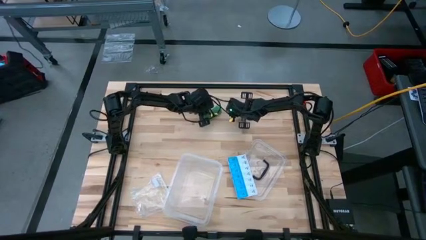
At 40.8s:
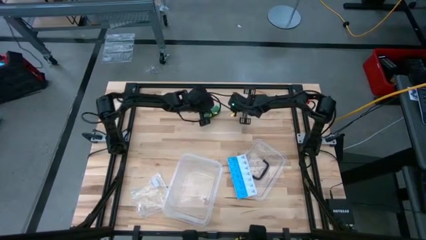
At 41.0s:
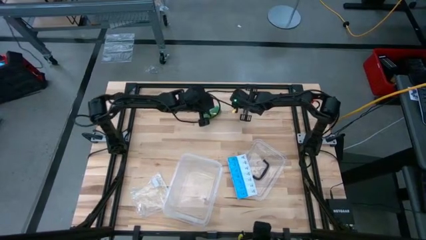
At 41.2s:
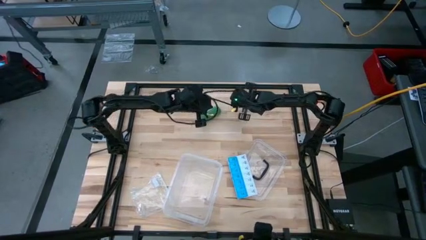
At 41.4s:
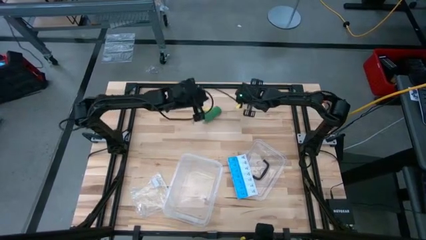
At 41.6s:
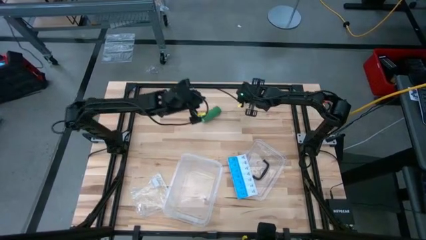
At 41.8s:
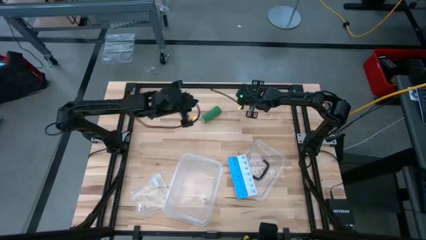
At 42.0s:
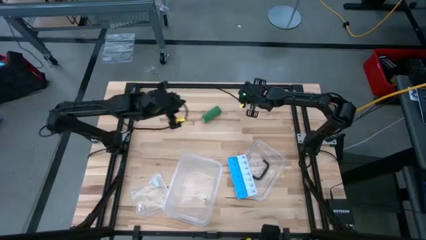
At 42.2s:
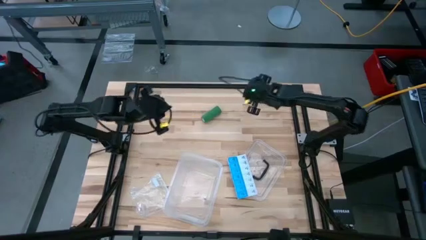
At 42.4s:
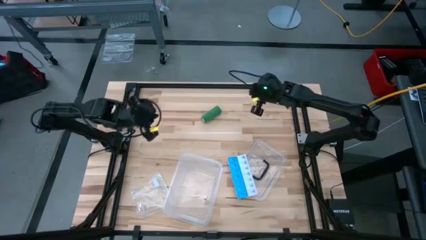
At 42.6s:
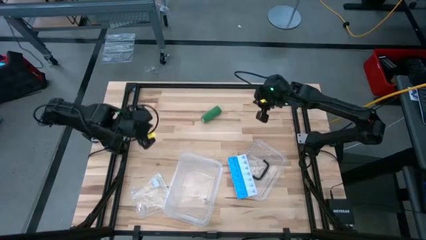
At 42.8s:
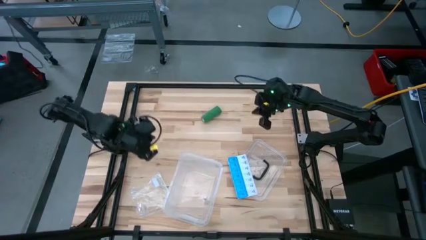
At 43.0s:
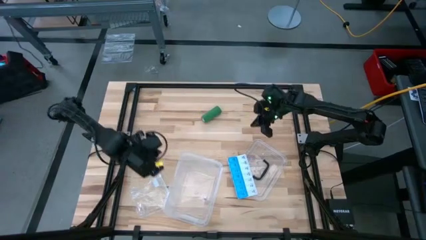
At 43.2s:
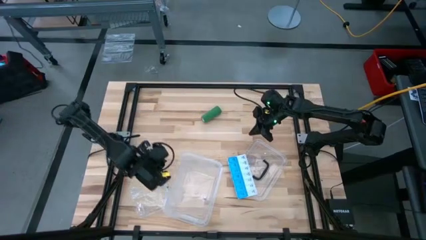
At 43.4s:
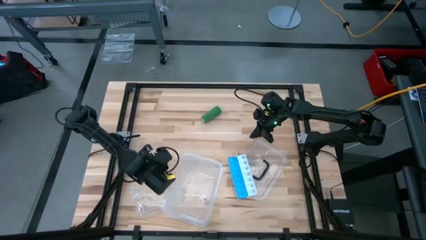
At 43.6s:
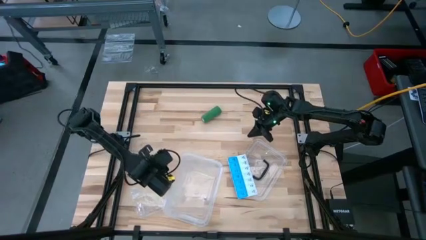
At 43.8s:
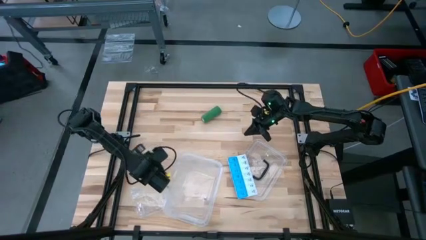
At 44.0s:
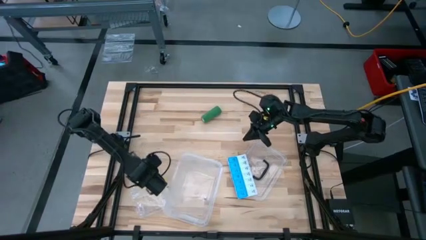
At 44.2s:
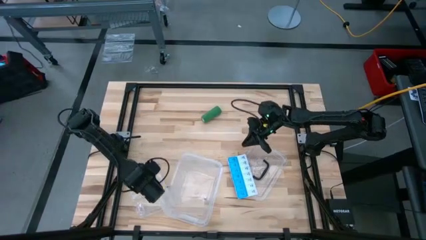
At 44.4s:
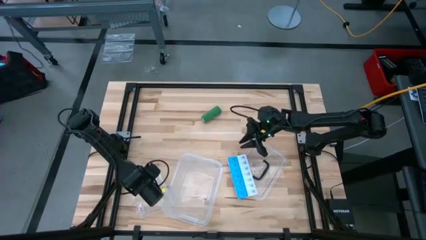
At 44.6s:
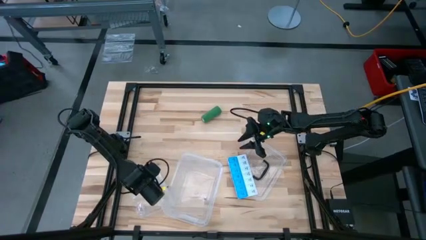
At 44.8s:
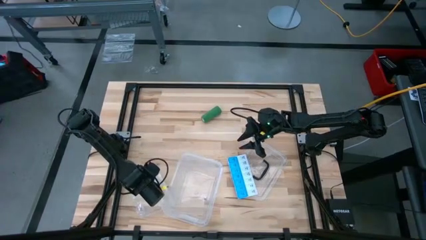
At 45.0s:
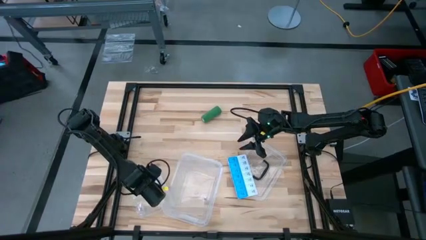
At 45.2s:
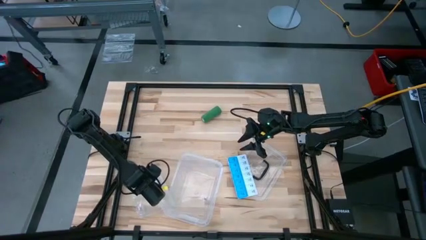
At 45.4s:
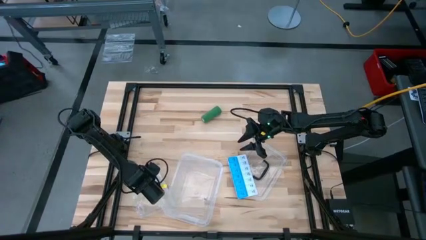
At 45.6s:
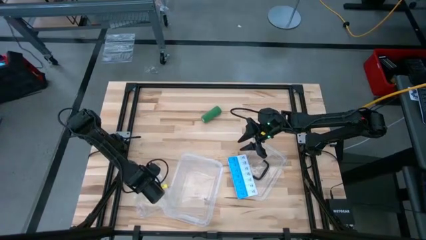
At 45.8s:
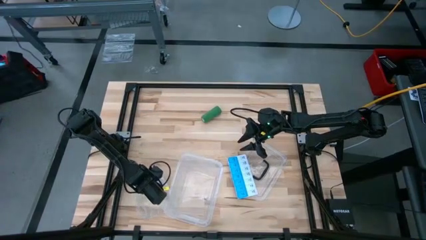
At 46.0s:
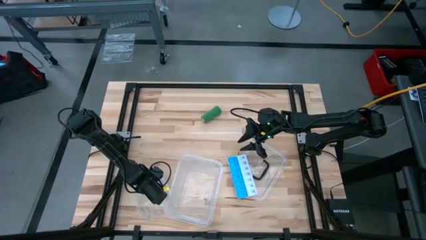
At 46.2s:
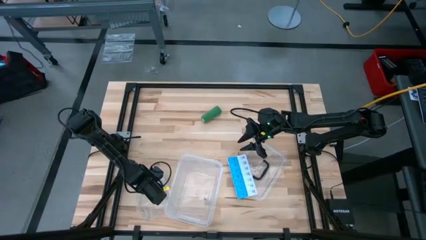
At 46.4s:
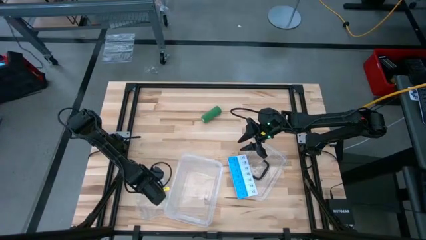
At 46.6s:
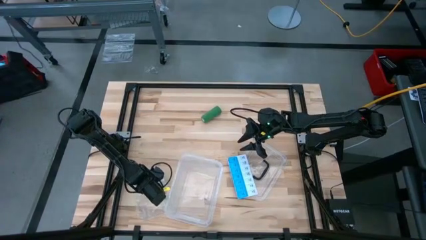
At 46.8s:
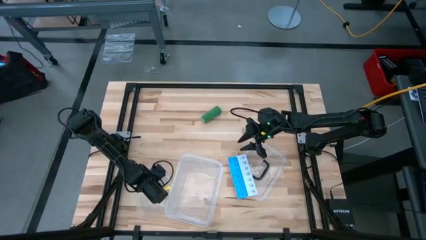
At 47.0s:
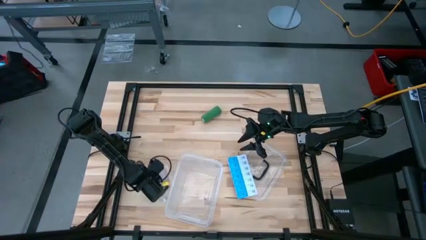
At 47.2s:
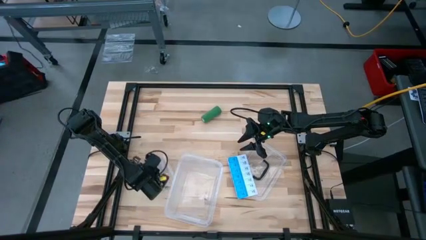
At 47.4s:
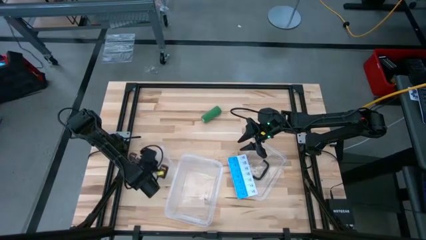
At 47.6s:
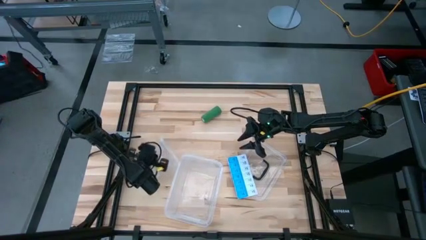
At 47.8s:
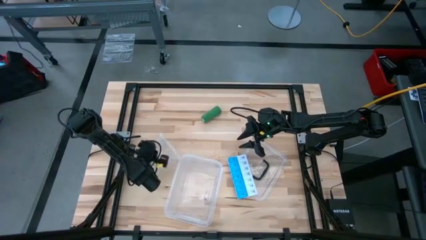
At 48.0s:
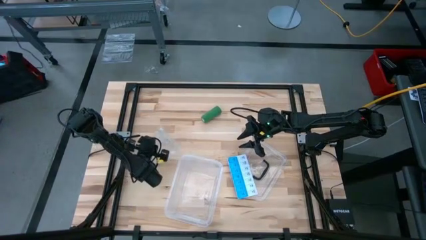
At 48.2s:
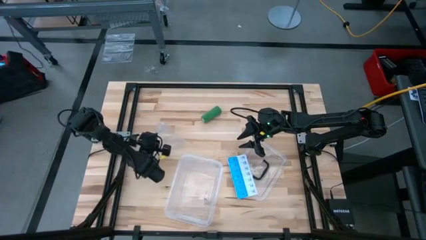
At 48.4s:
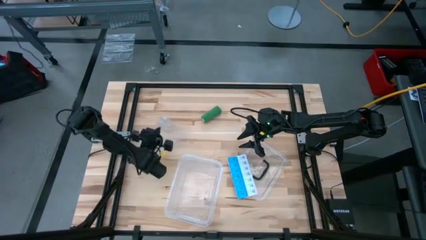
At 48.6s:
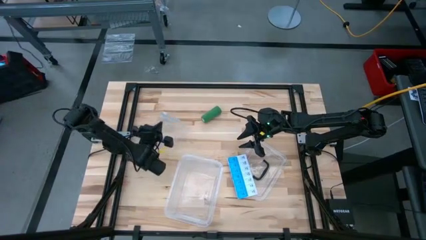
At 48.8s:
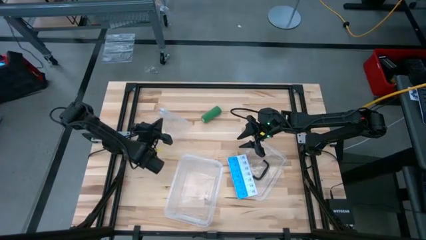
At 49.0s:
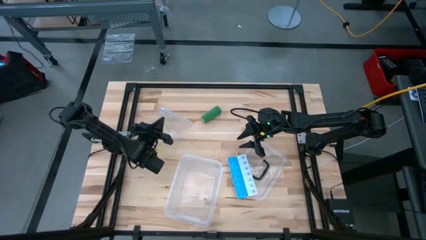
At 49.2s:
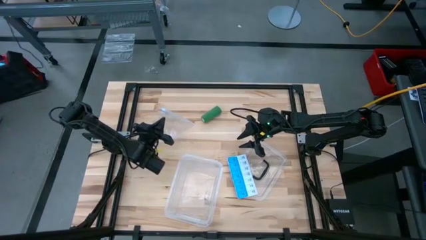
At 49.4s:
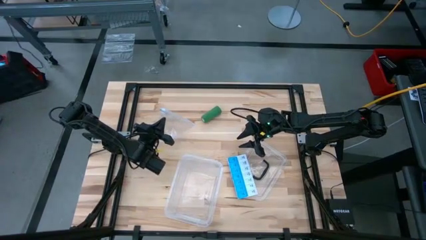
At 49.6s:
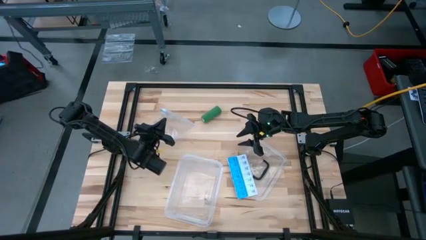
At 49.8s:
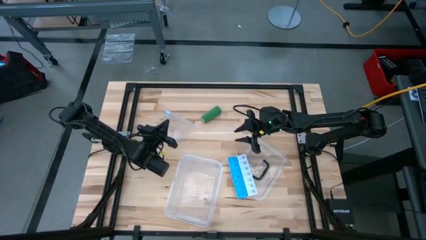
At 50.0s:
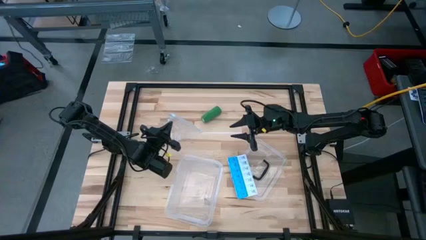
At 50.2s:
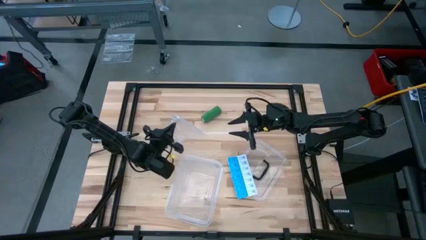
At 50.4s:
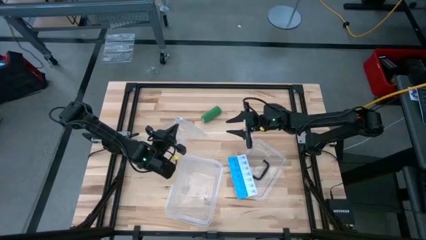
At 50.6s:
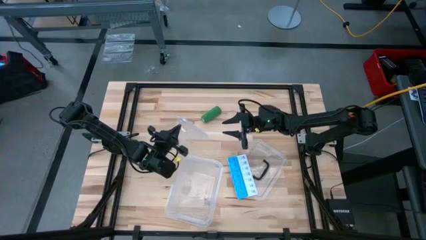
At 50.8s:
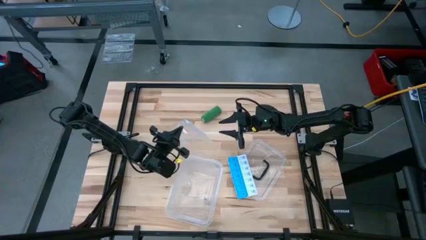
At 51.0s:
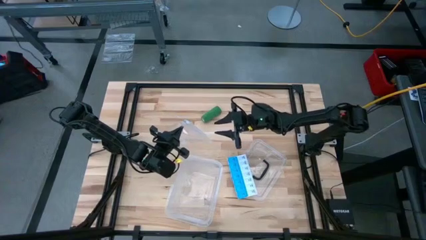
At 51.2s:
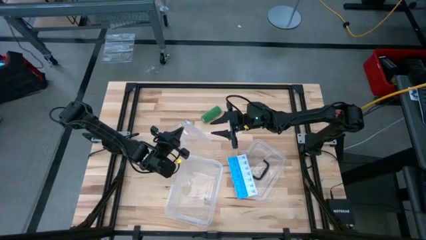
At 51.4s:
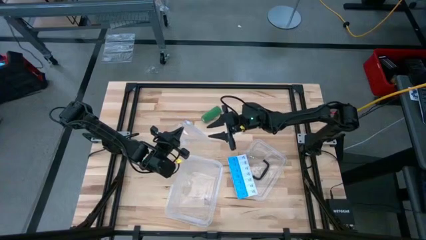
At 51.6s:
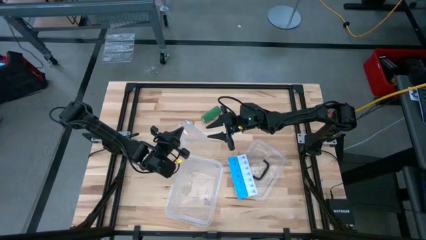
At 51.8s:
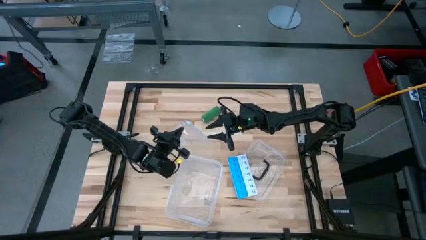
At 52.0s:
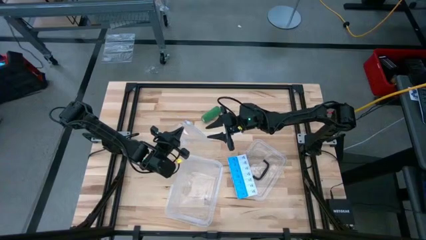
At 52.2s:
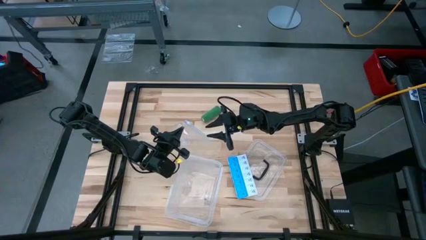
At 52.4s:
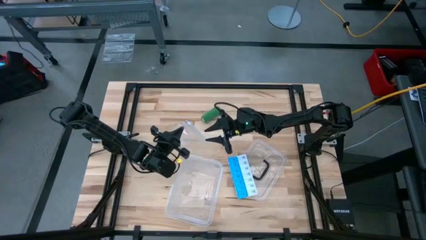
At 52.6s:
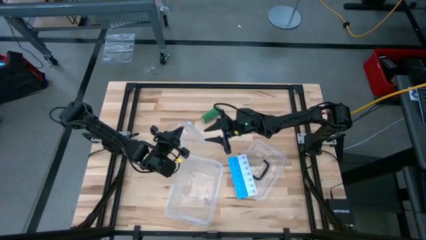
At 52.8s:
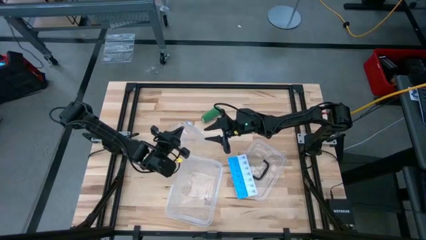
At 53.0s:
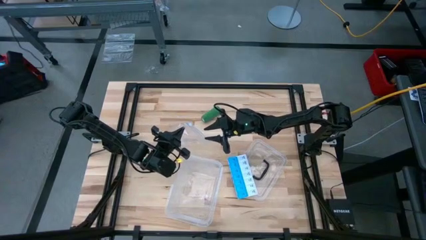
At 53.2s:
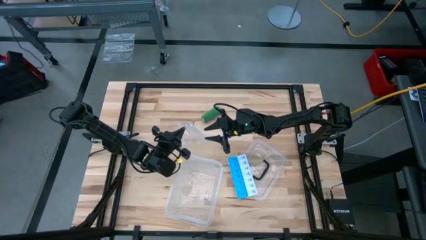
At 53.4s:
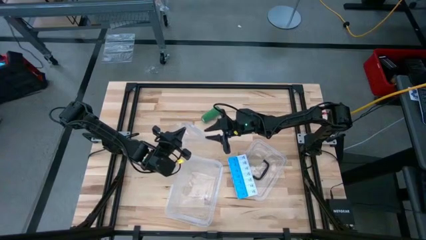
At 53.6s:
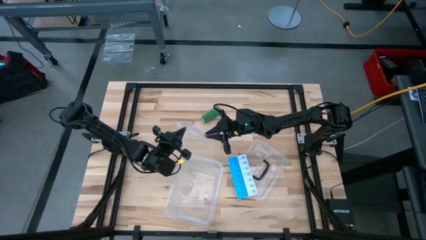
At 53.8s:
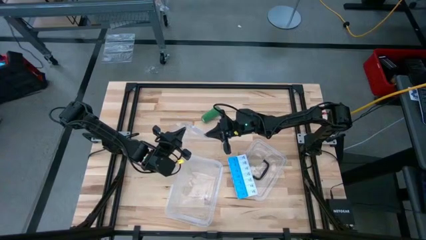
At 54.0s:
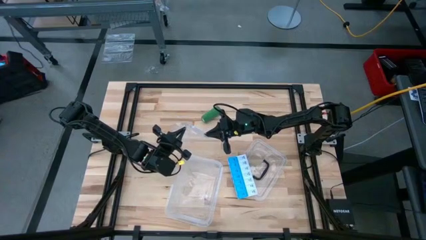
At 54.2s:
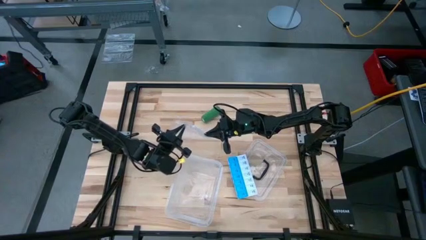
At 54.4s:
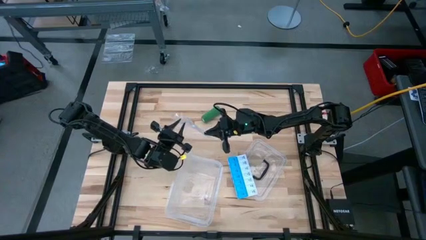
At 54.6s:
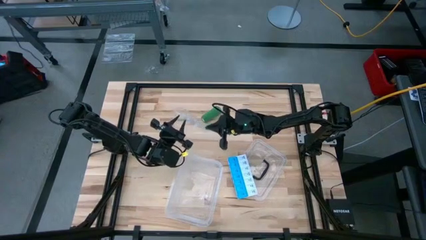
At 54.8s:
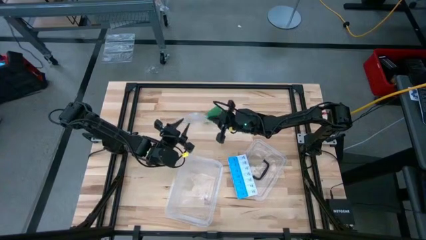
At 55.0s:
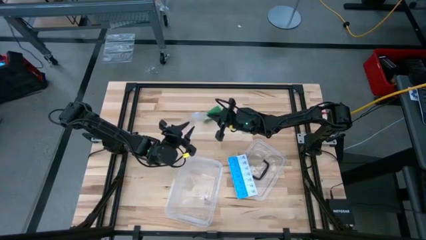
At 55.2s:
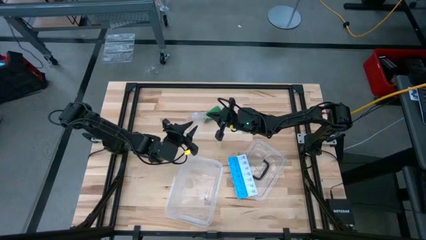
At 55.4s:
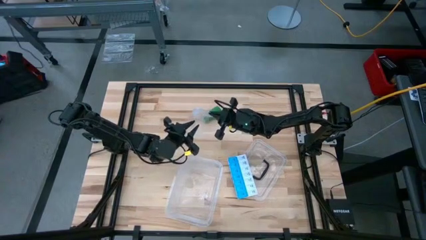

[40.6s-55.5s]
Task: Roll bandage
Prepare the transparent zip bag

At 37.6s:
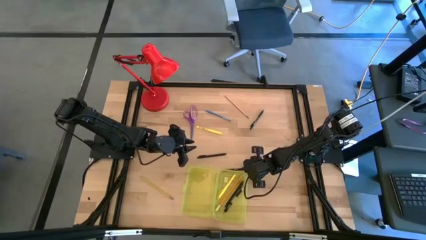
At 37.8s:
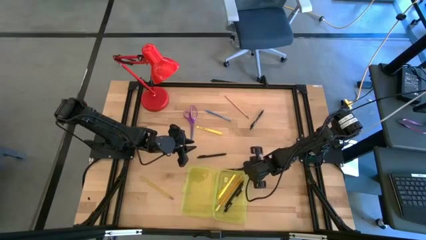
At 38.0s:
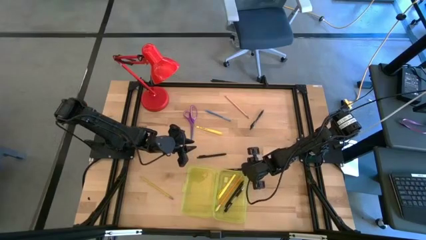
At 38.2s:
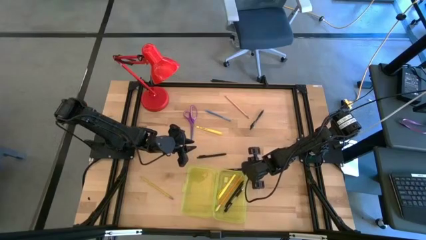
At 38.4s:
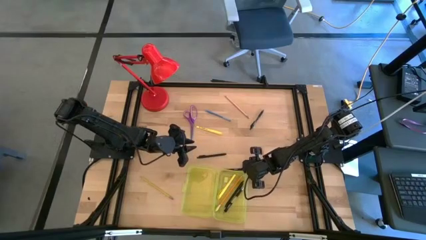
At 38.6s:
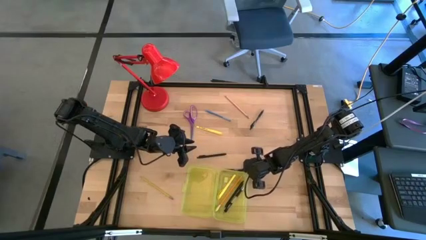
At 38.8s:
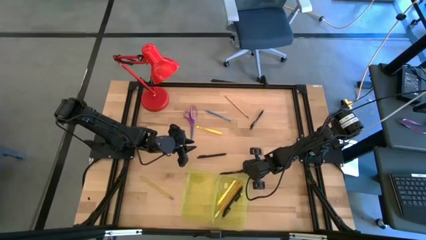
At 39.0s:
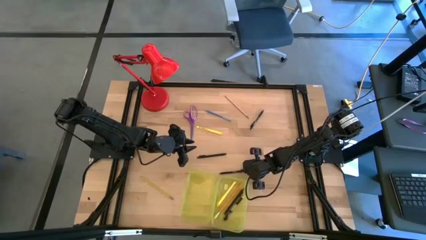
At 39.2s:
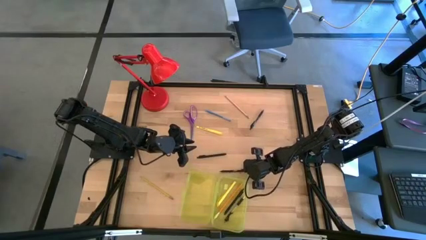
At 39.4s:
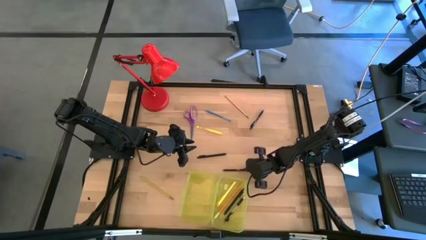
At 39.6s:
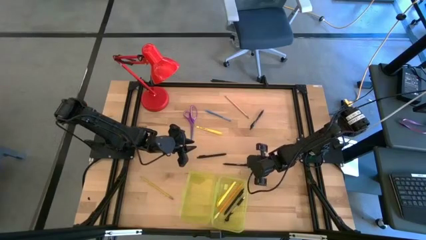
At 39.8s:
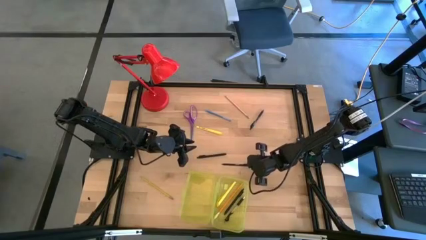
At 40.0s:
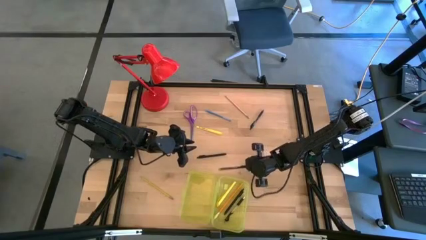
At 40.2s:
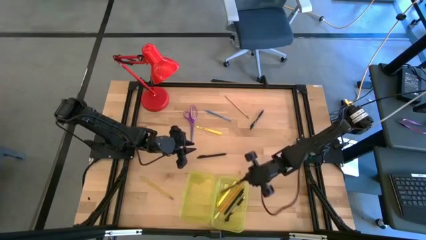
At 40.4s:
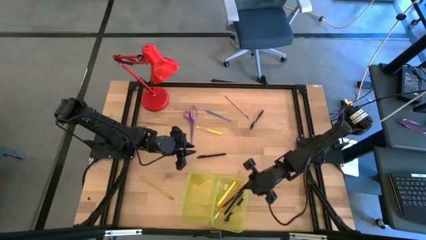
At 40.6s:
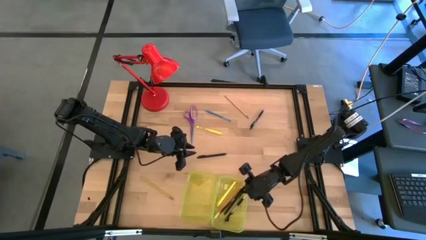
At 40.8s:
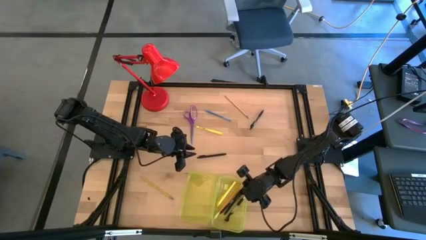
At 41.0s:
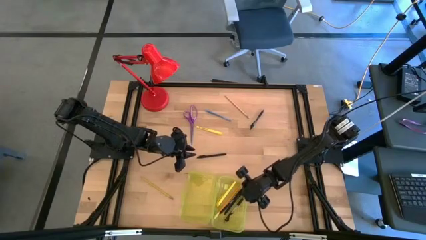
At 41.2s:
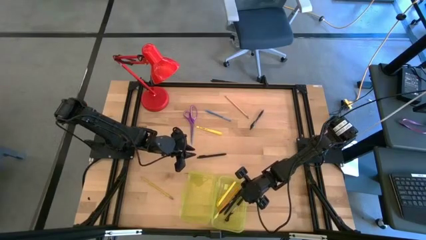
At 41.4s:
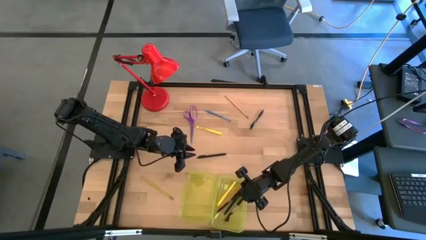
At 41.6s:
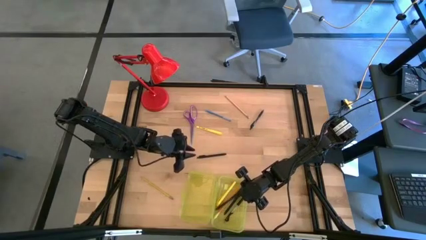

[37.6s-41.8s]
Task: Pick & place school supplies into a supply box
Put the black pen into the yellow supply box
